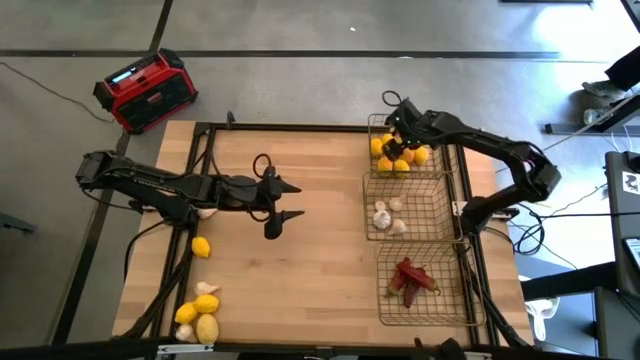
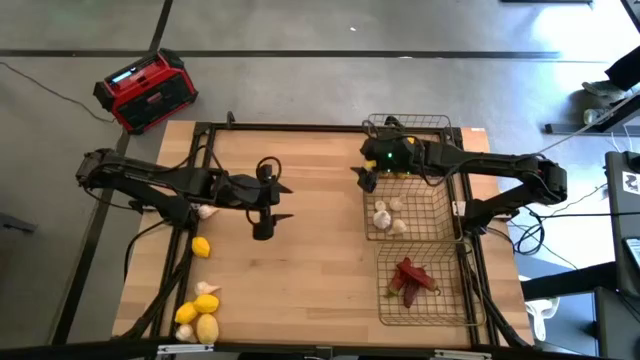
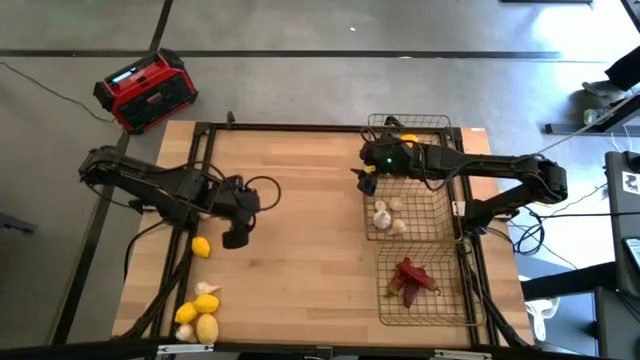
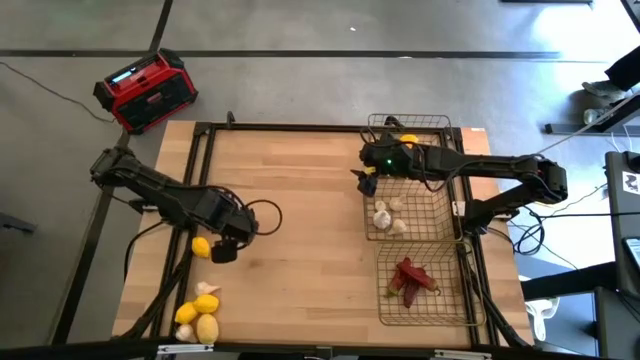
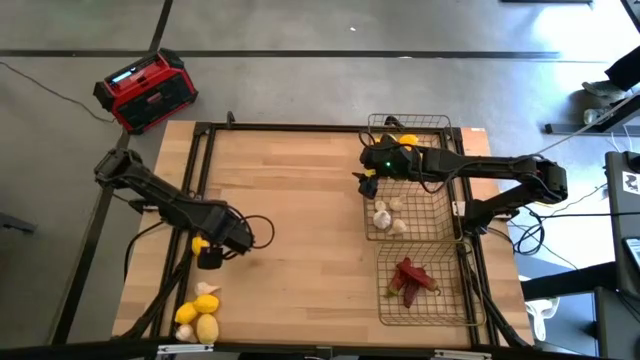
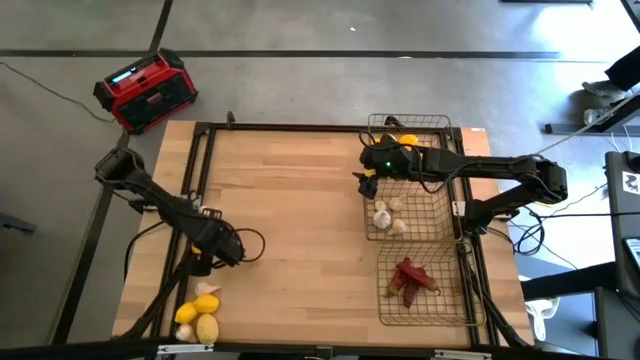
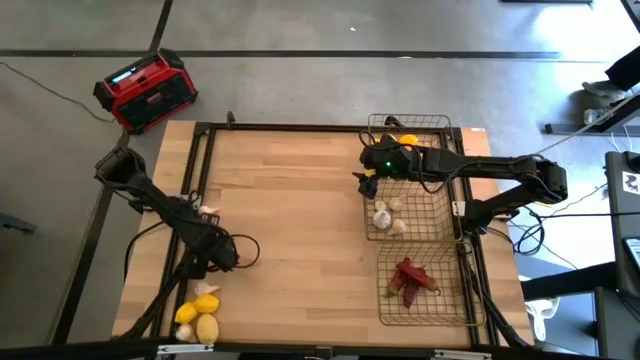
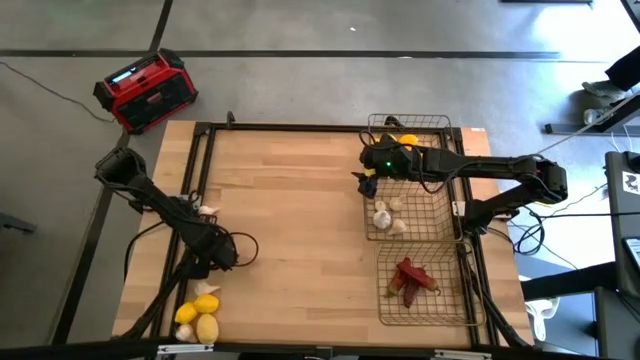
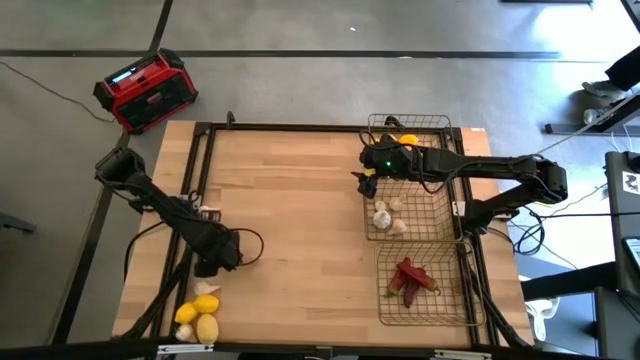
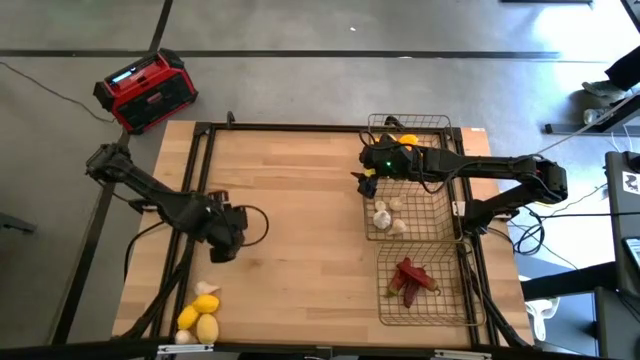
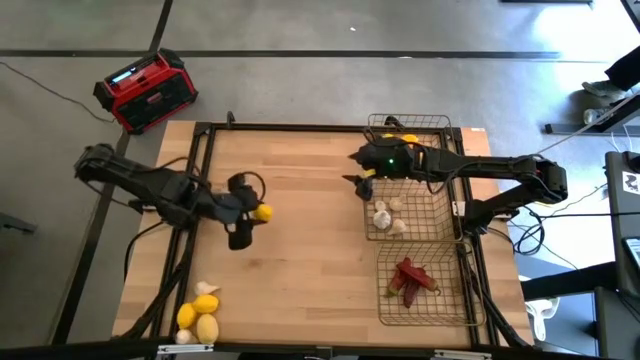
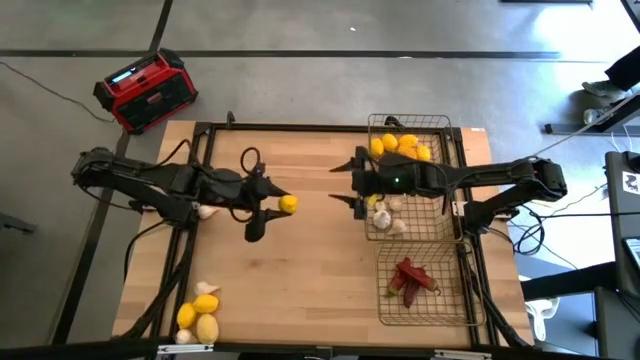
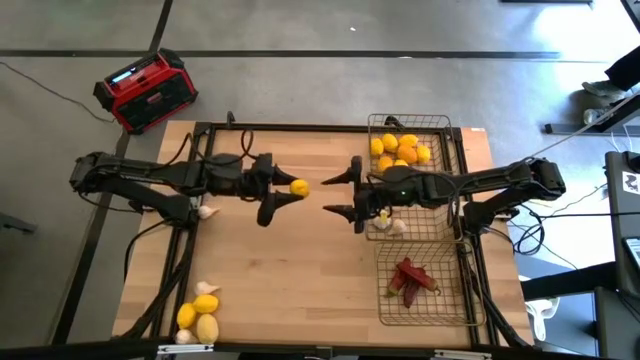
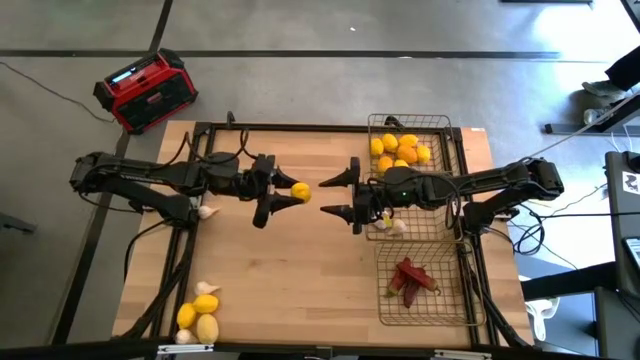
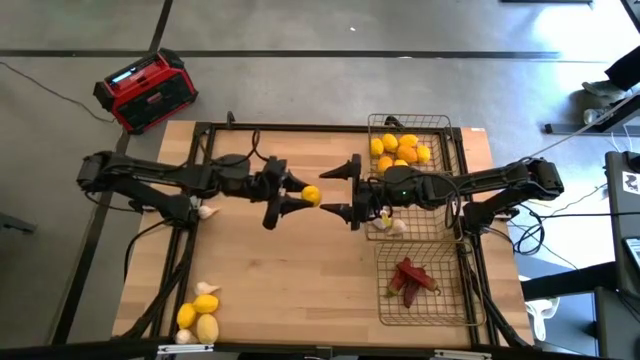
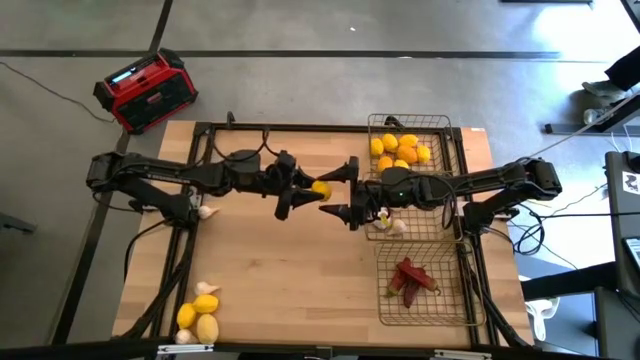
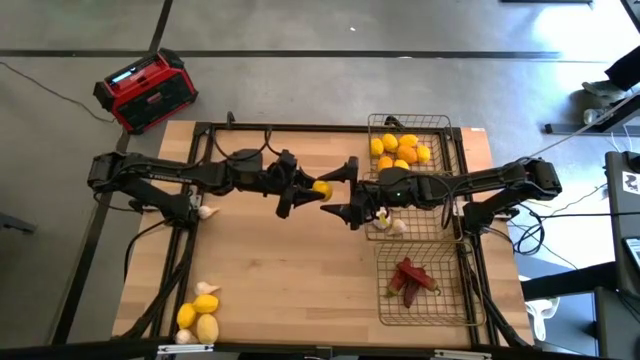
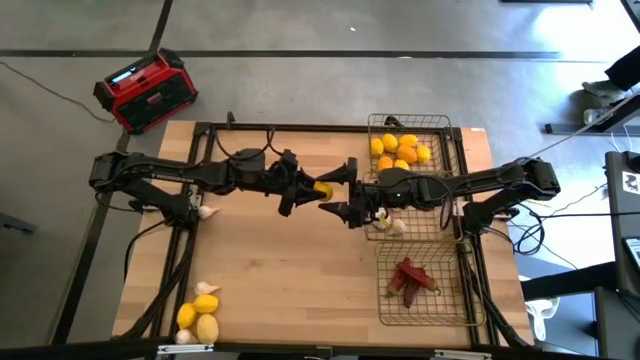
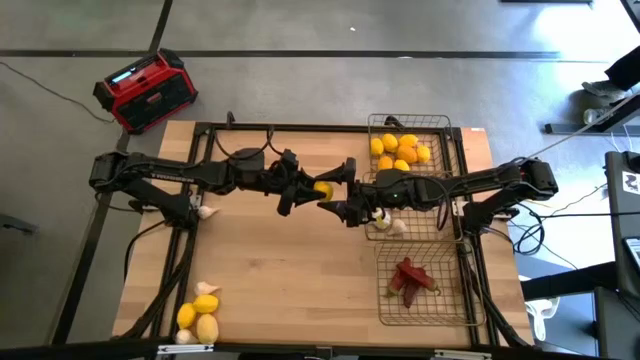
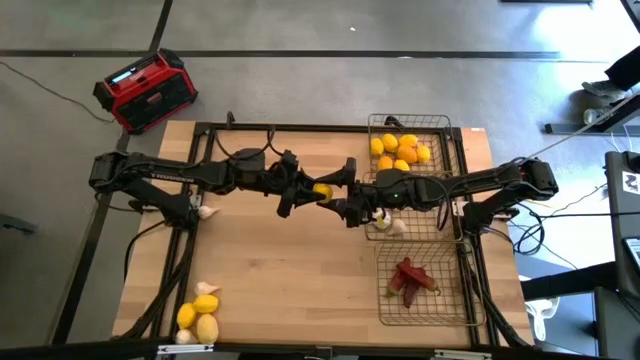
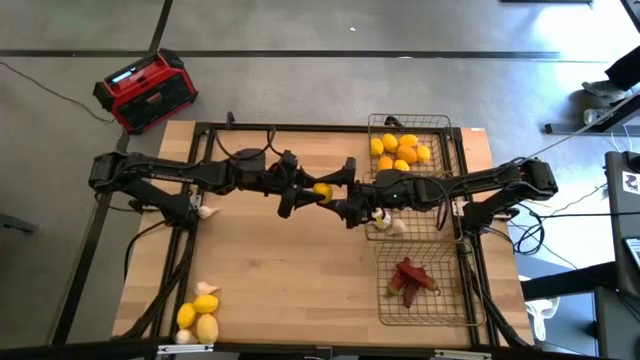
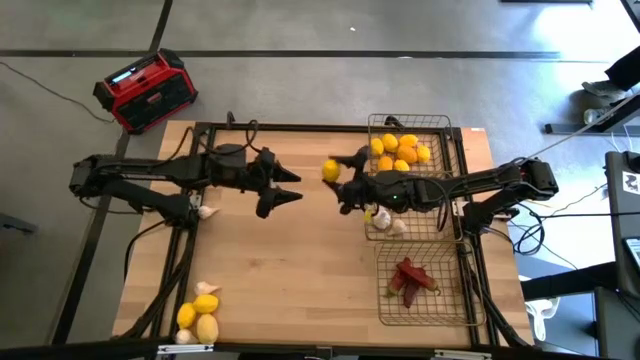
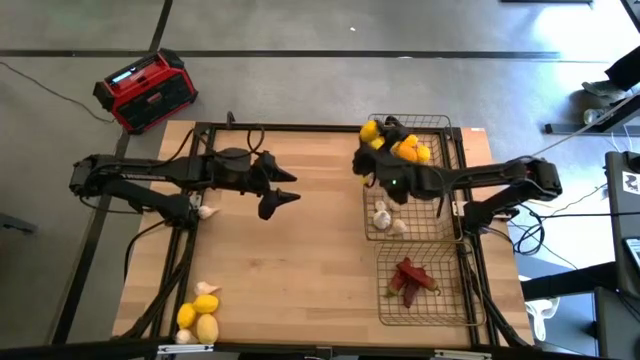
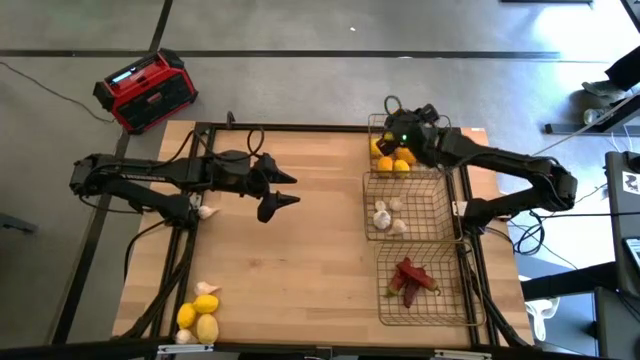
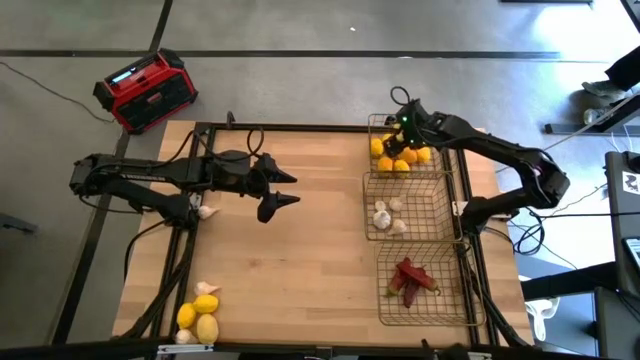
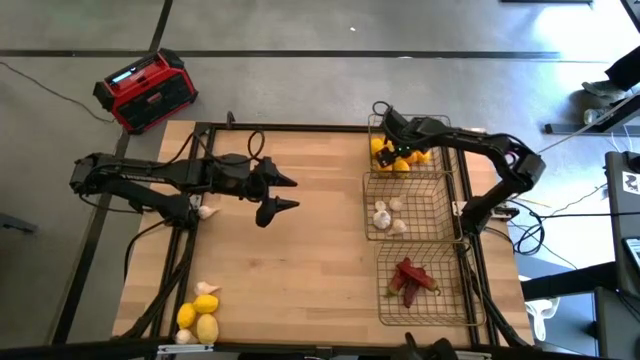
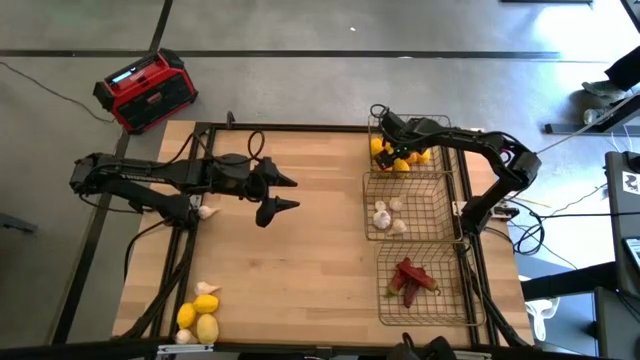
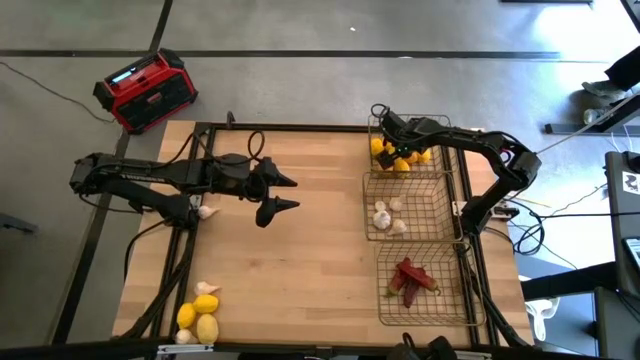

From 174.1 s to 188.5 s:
Task: Sort produce into baskets
Put the yellow lemon into the top wire basket

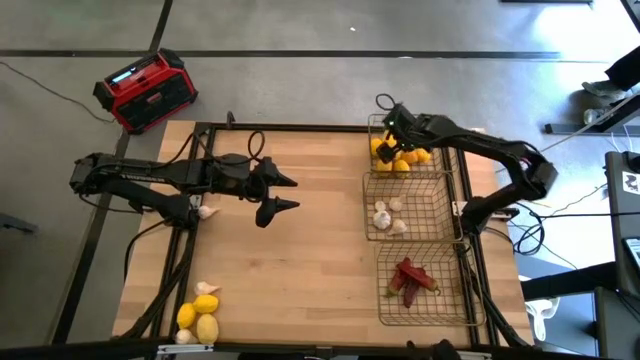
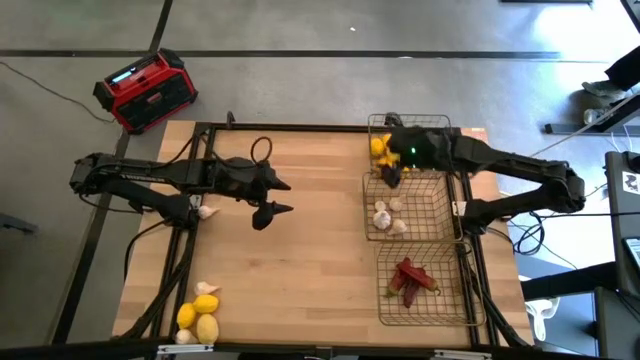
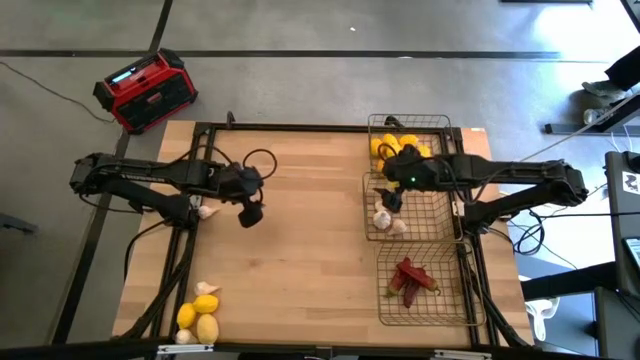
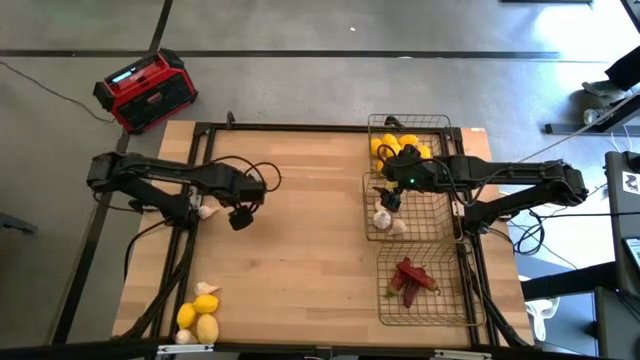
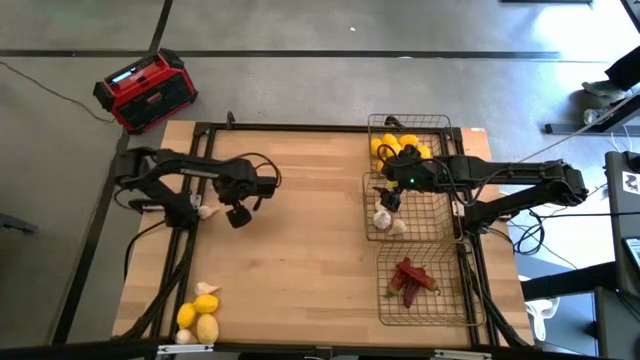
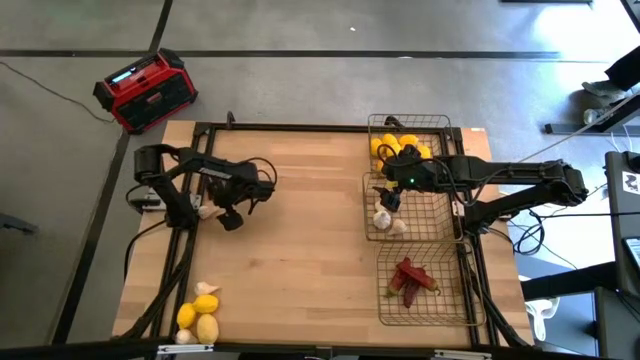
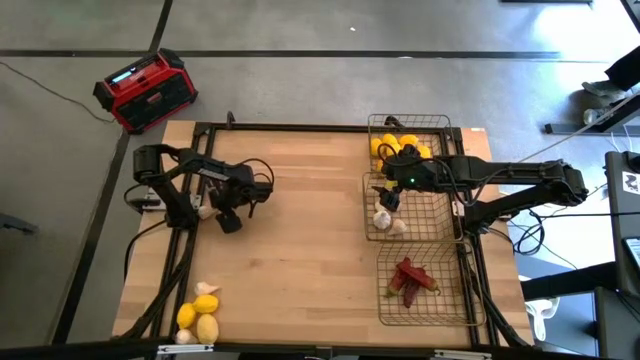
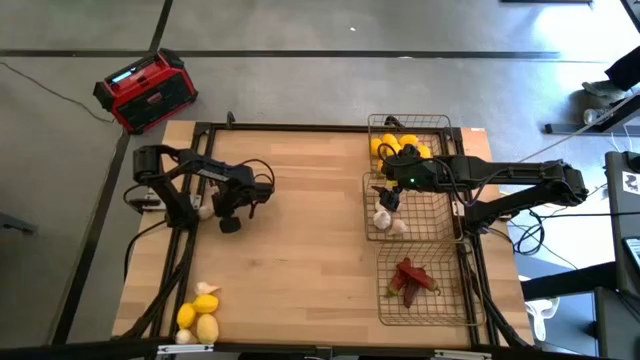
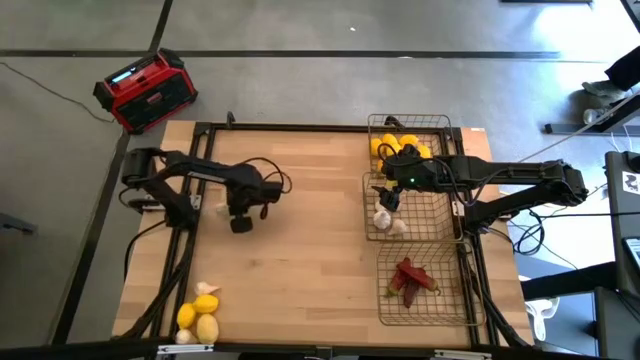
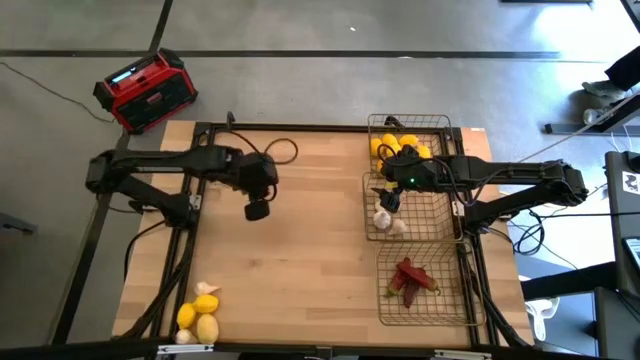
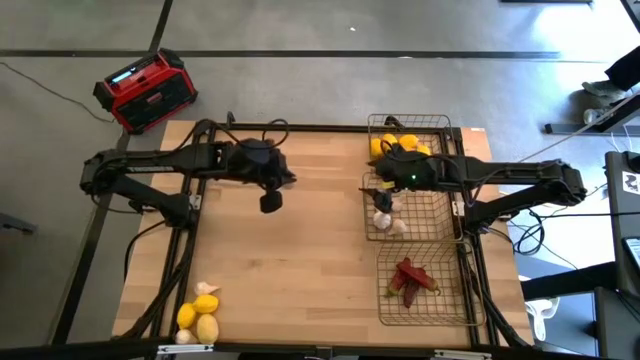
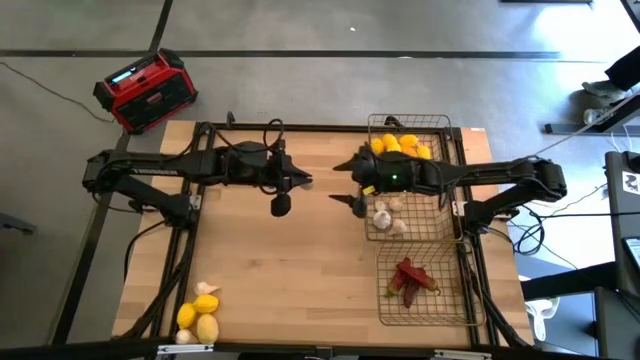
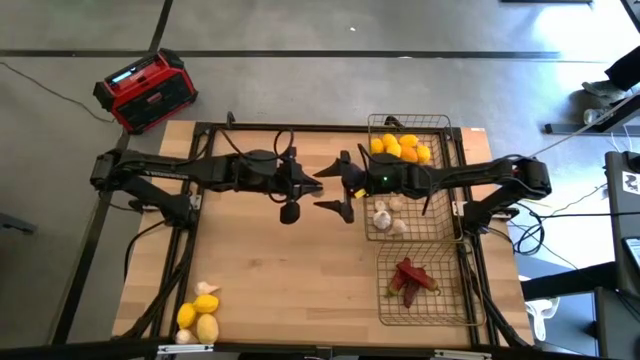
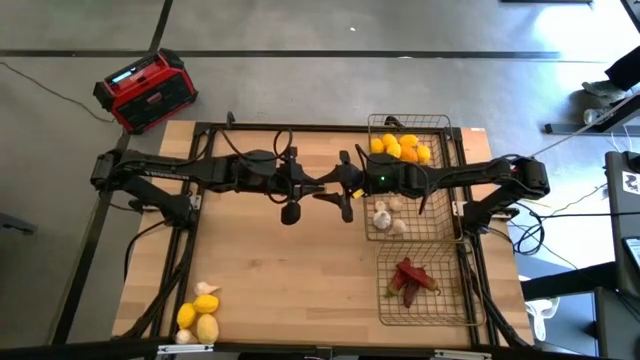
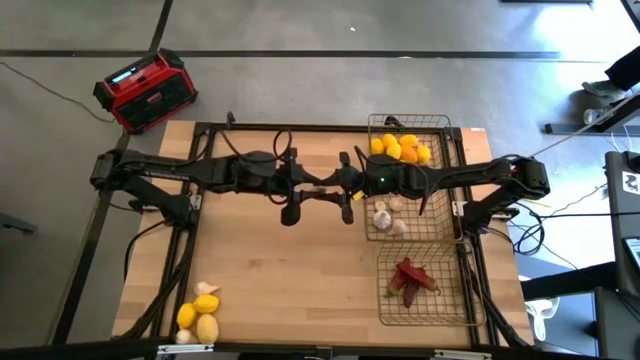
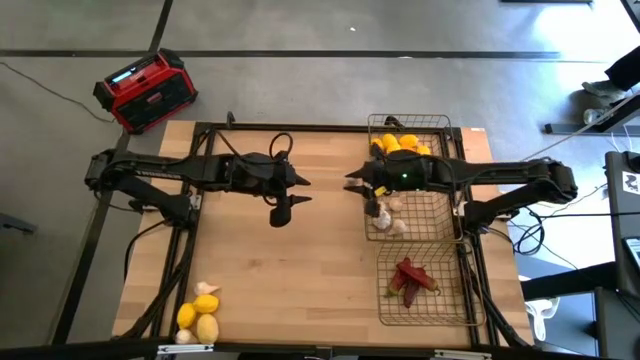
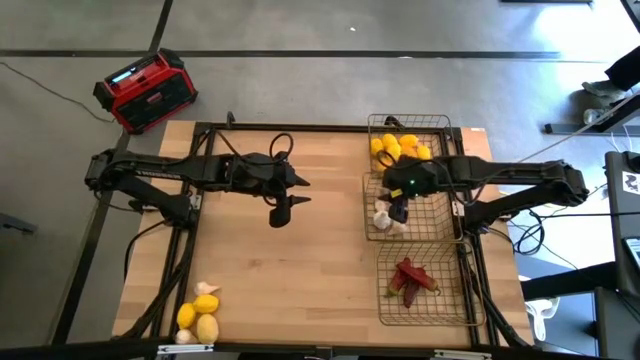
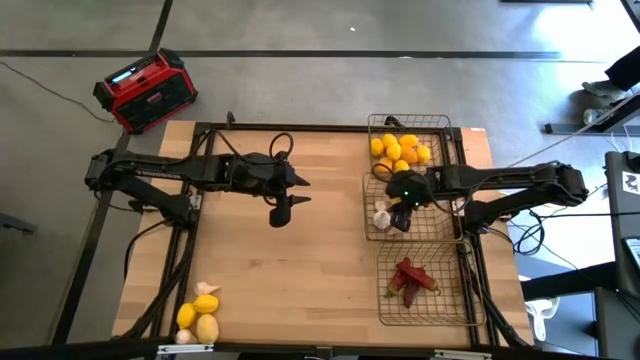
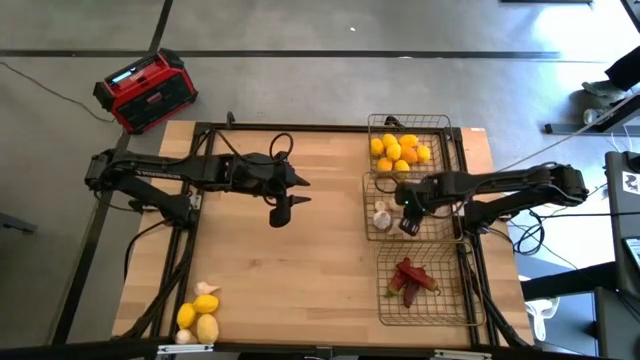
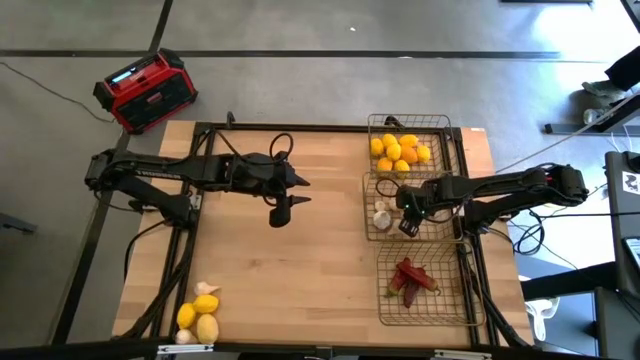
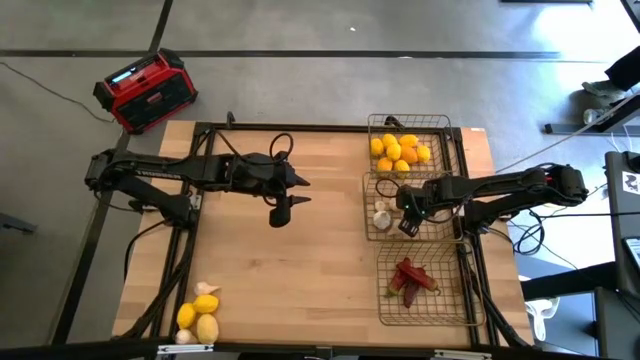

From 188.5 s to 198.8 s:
Put the white garlic into the middle wire basket
